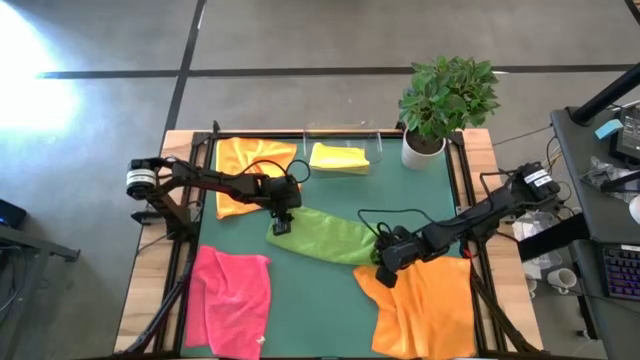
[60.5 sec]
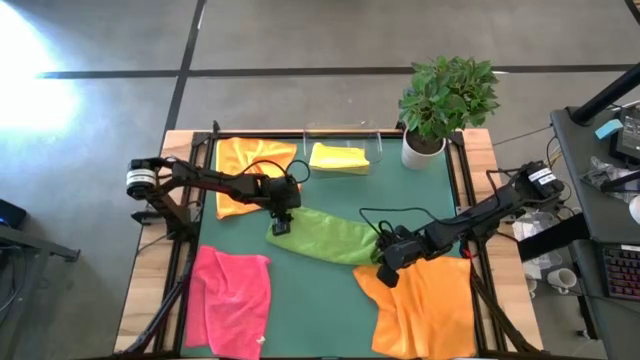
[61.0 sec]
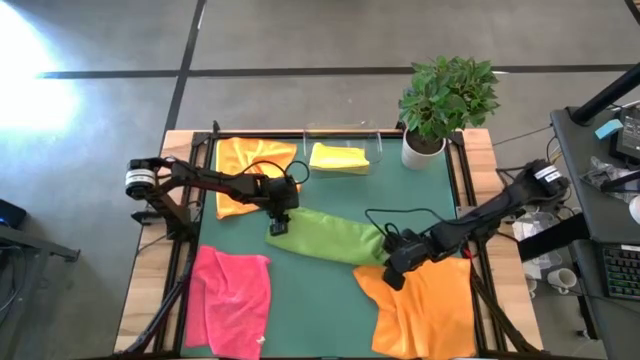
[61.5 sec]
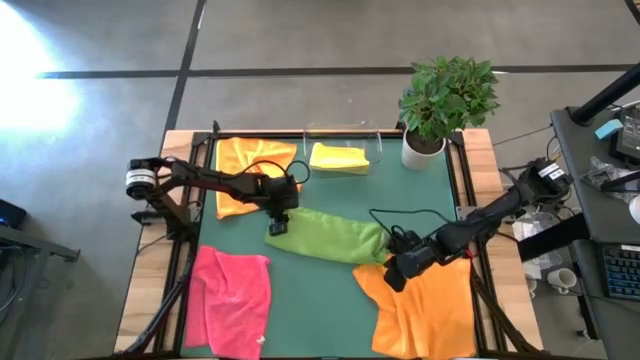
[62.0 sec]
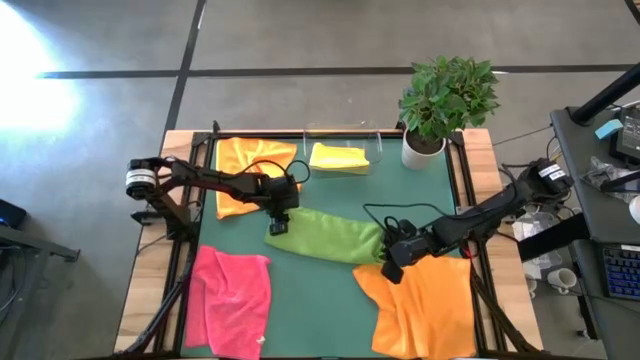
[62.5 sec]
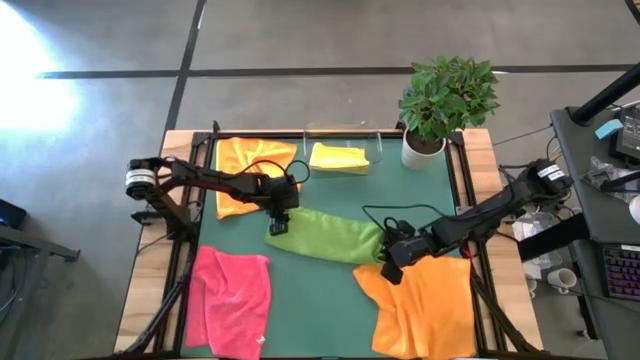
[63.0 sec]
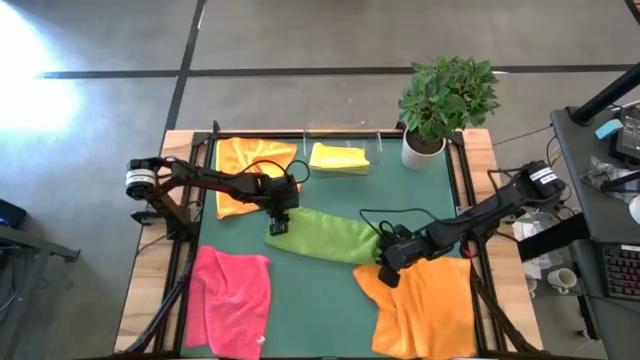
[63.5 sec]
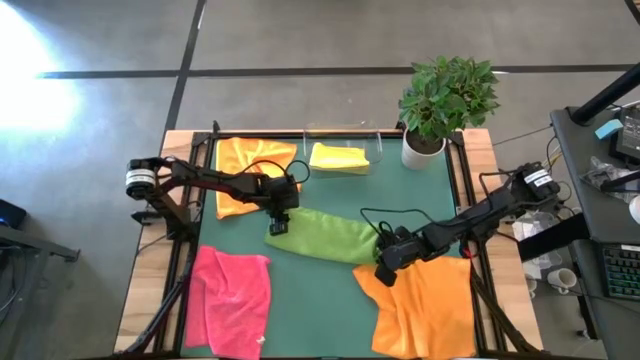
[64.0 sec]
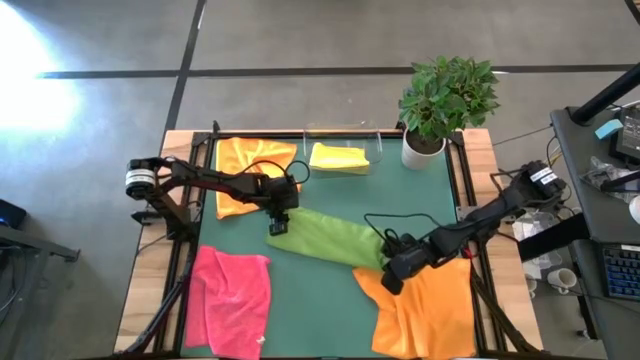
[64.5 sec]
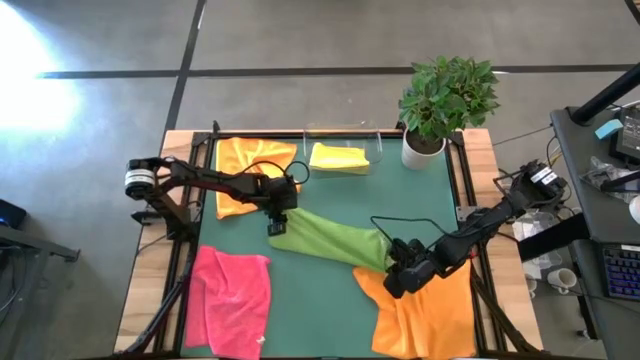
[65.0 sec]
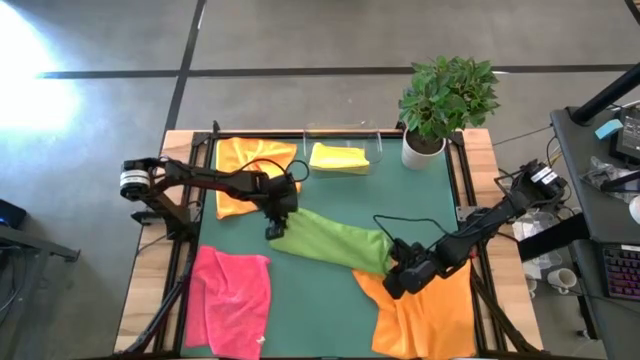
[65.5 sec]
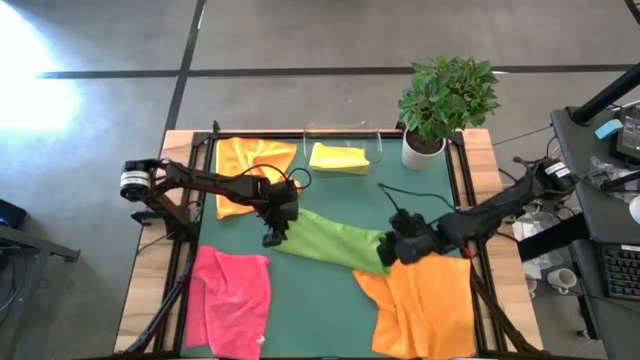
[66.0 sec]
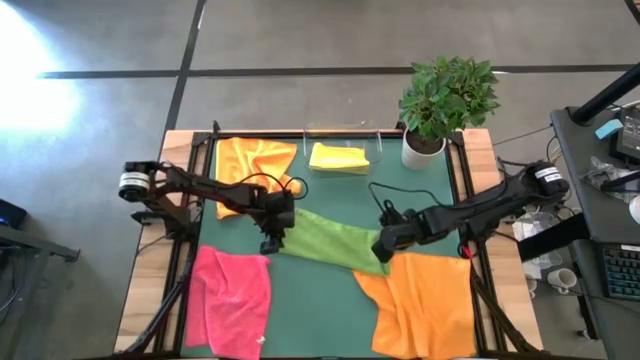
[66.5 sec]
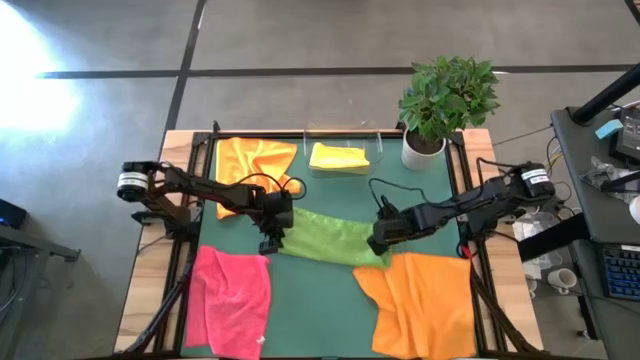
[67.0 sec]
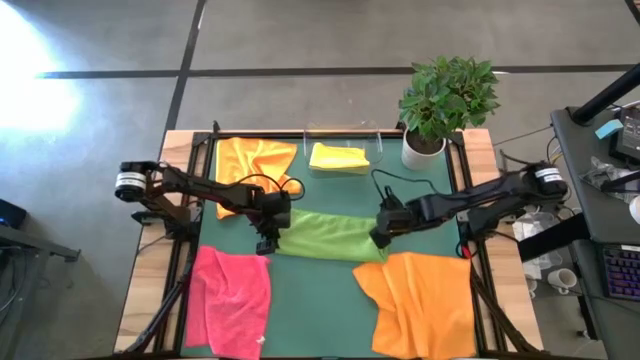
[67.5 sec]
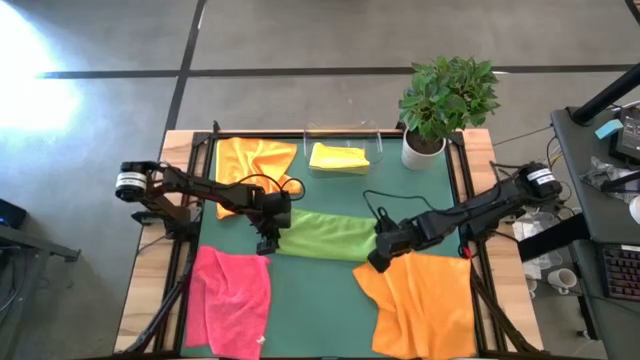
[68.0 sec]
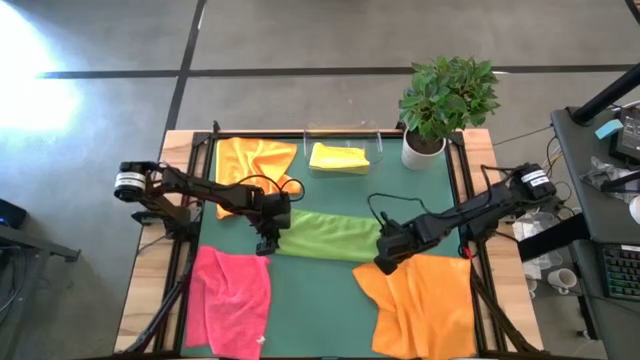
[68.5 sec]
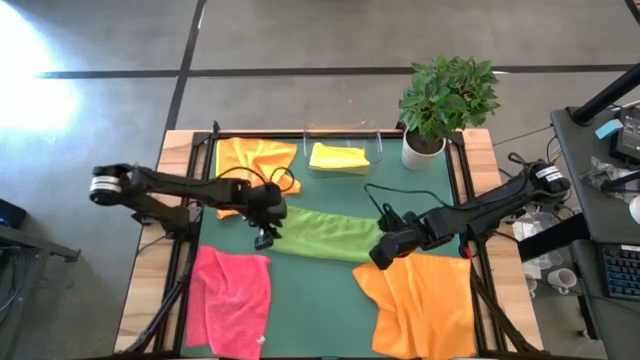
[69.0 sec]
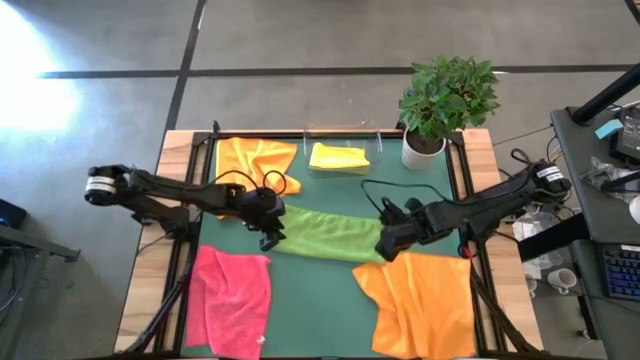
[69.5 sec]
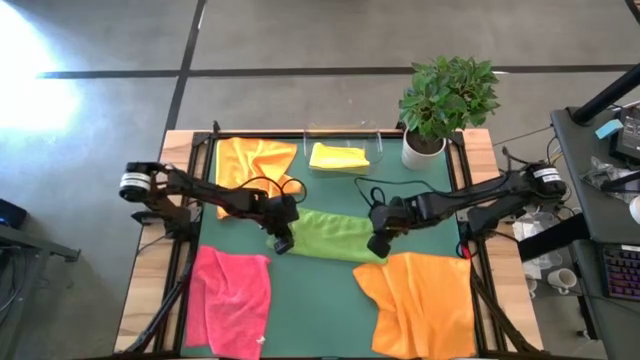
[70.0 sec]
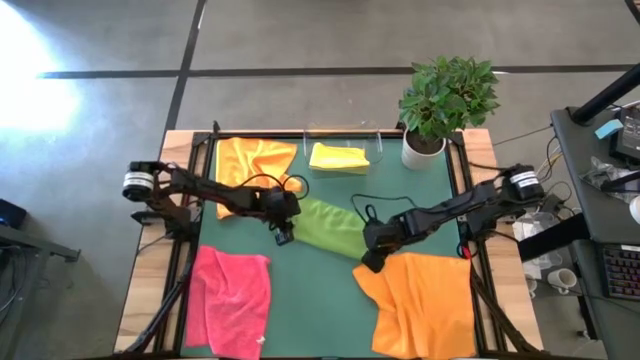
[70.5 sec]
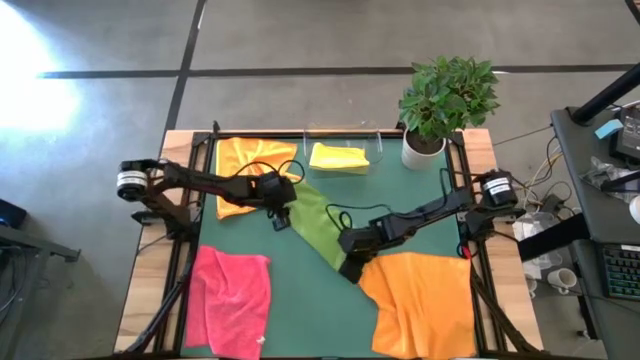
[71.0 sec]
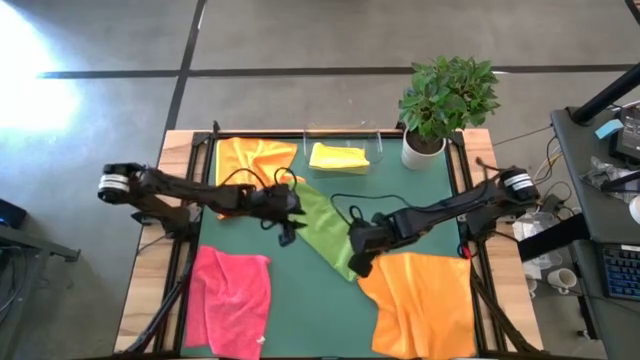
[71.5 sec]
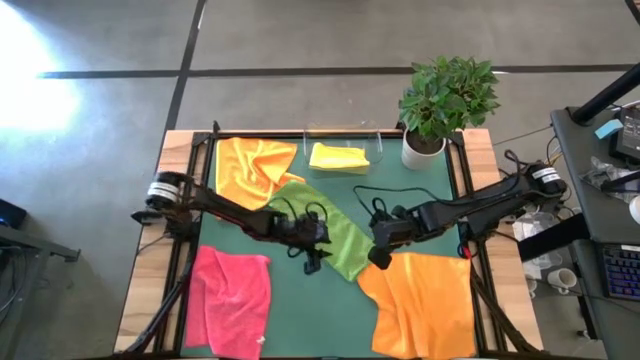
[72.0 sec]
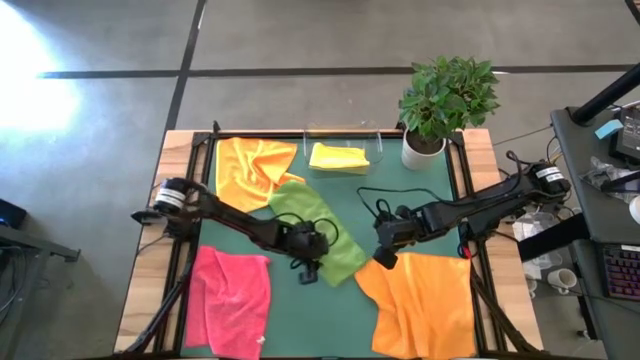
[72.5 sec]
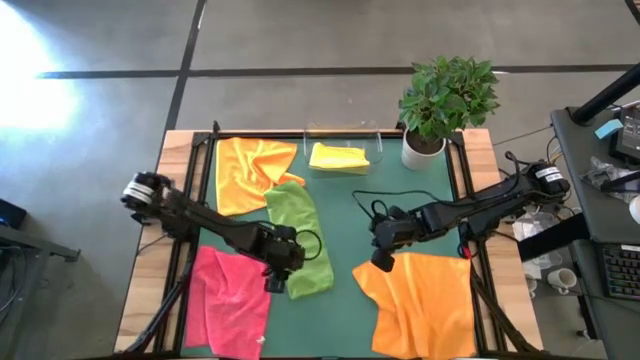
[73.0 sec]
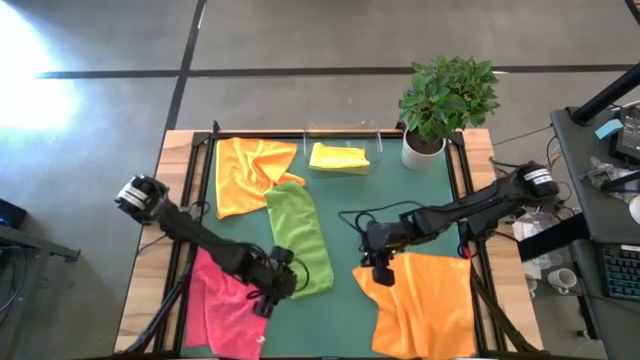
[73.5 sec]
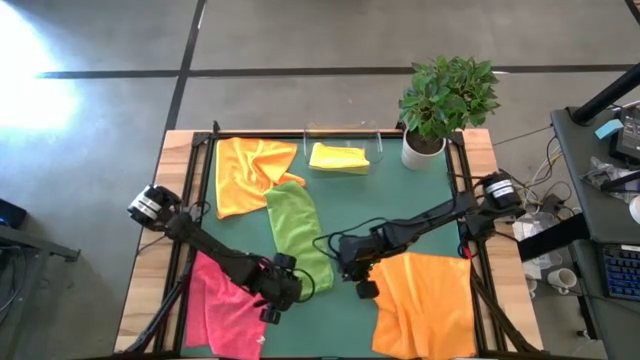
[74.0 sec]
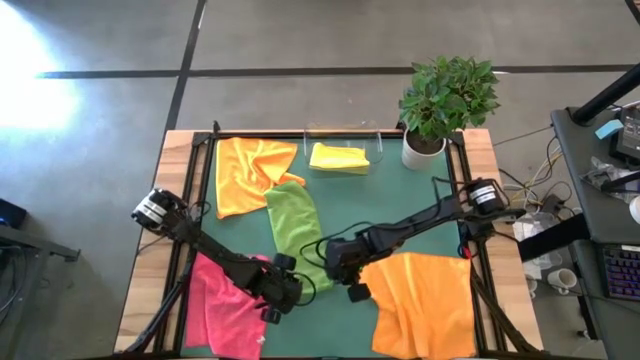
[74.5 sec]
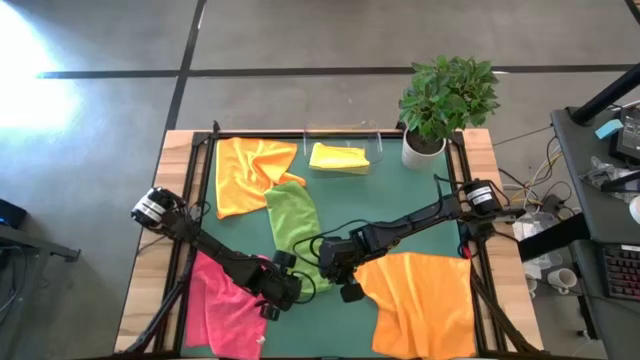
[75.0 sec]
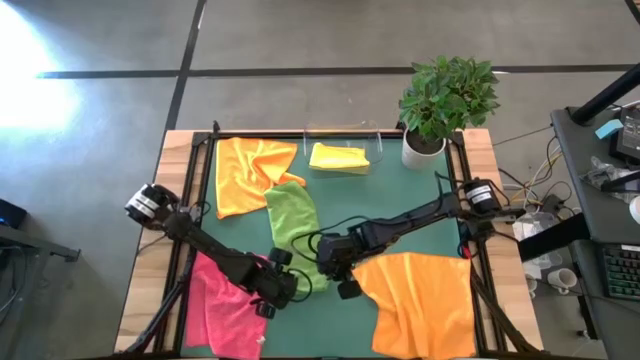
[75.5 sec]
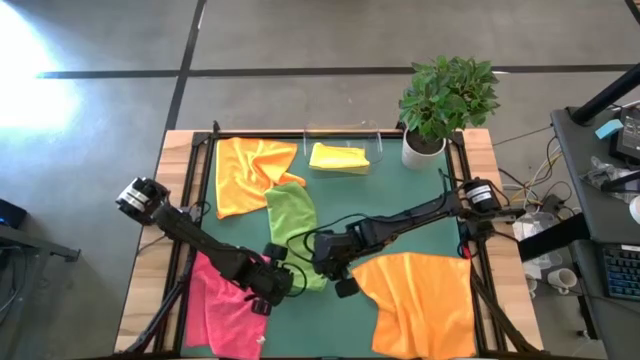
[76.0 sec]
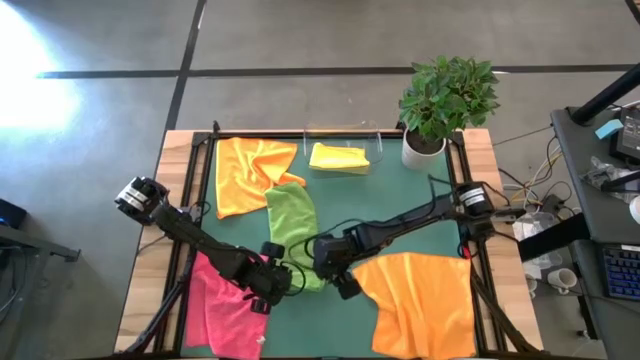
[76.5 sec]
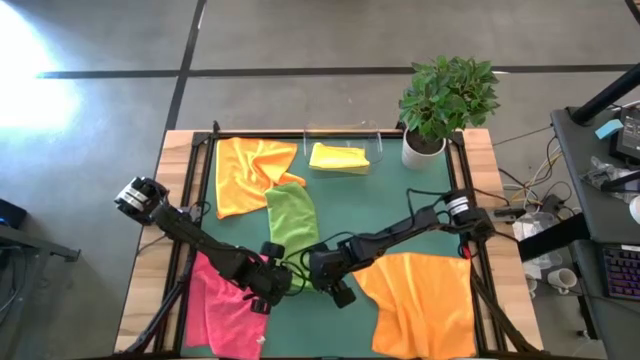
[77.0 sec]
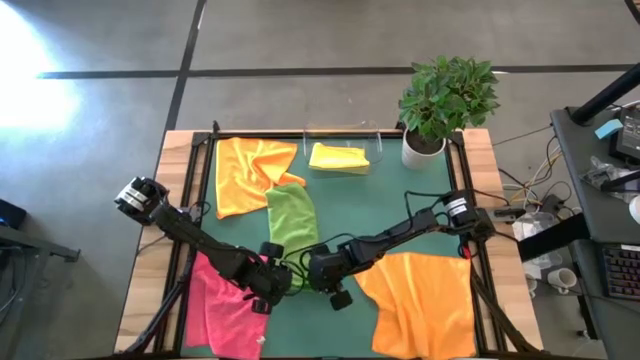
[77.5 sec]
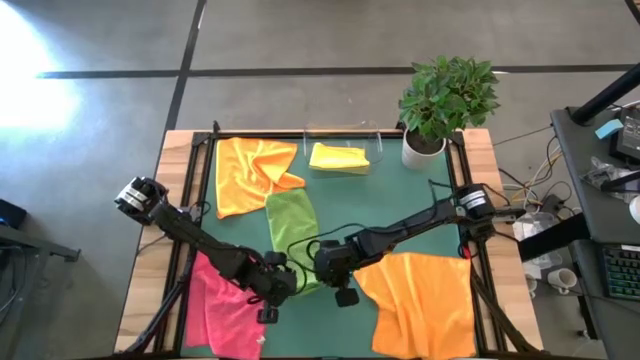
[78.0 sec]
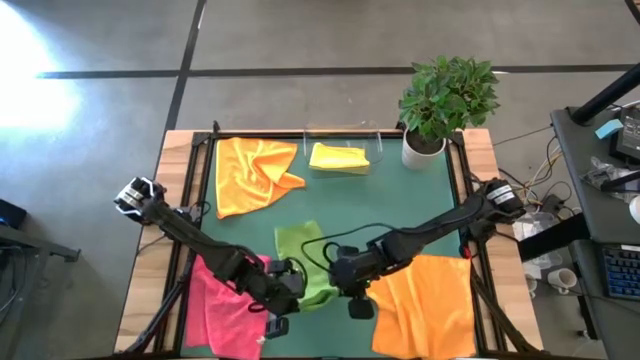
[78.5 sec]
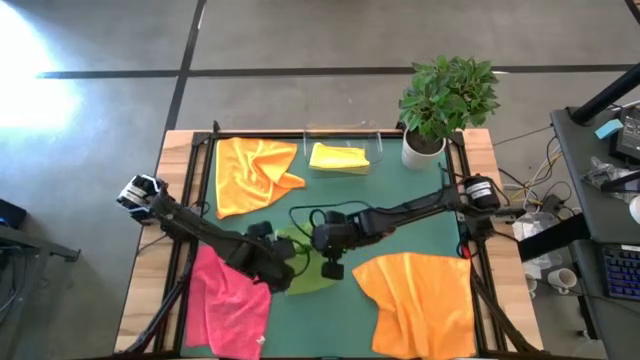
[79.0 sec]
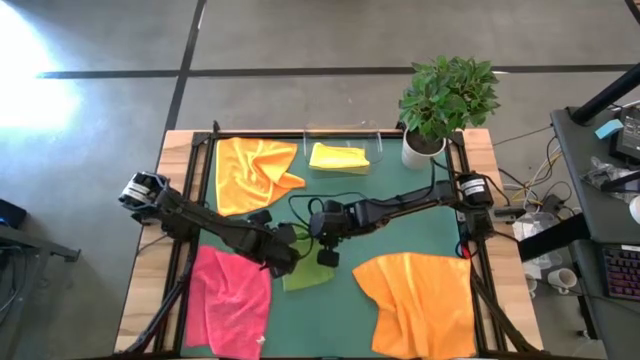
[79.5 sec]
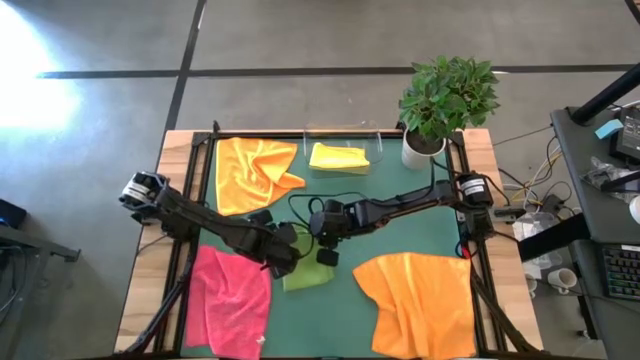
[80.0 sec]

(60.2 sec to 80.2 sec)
Task: Fold microfiber towels
Fold the green towel

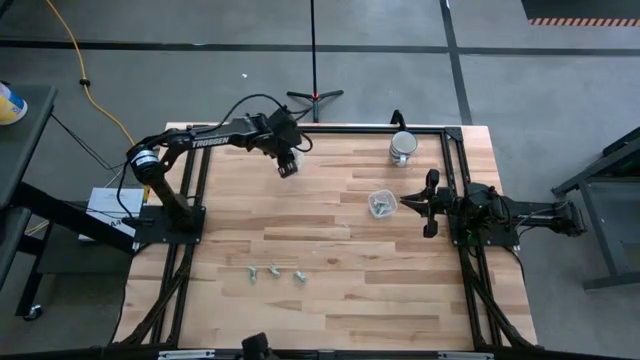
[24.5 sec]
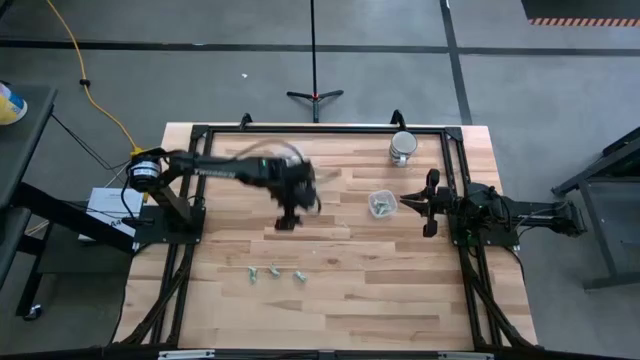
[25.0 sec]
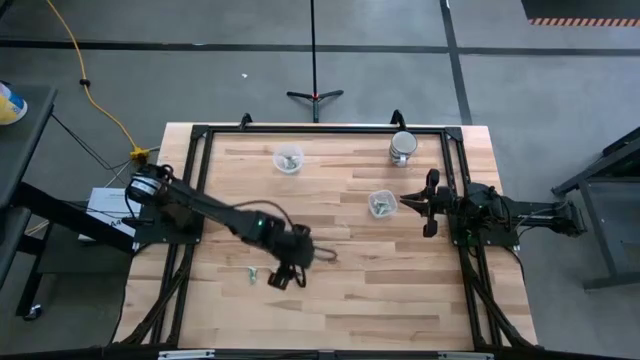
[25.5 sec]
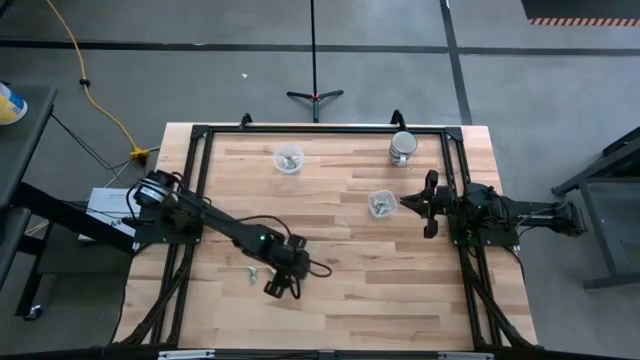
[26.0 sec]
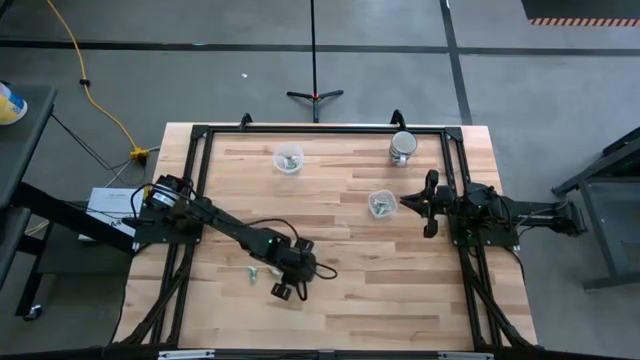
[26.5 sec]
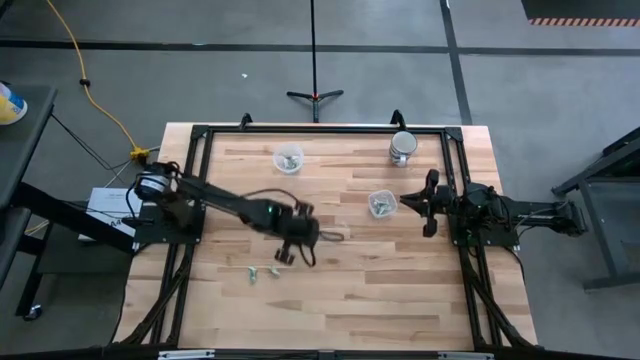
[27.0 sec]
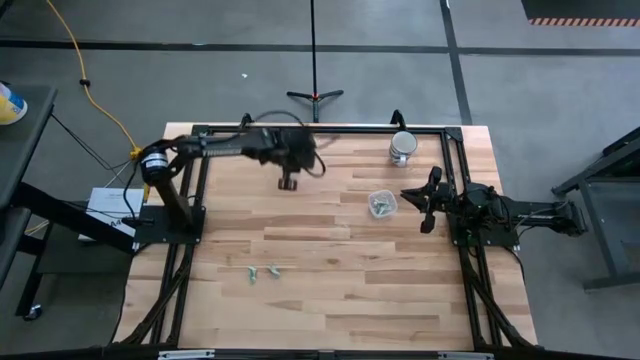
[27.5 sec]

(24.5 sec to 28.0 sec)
Task: Pick and place Stevia / Truvia into bins
Put the stevia packet into the round transparent container
